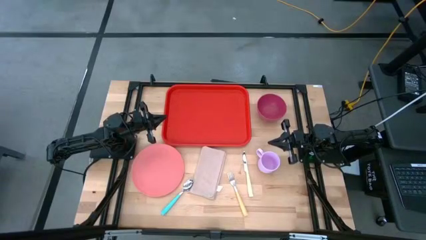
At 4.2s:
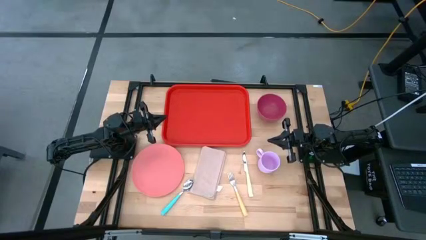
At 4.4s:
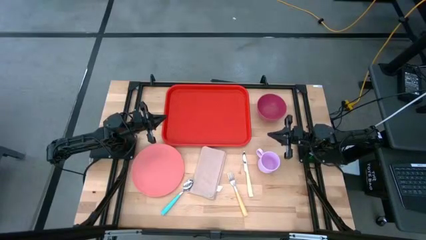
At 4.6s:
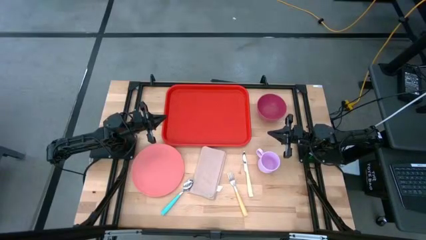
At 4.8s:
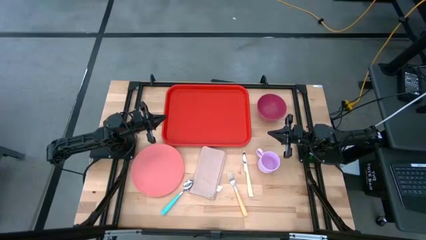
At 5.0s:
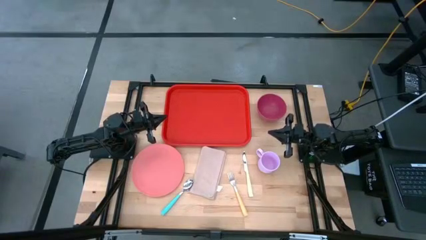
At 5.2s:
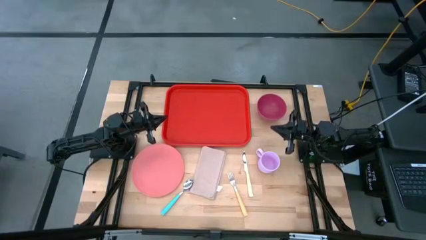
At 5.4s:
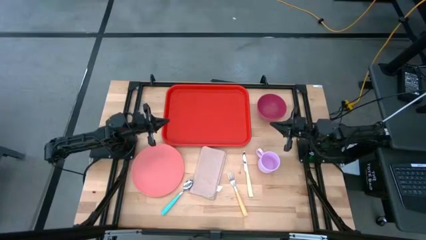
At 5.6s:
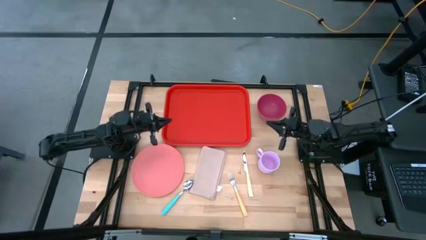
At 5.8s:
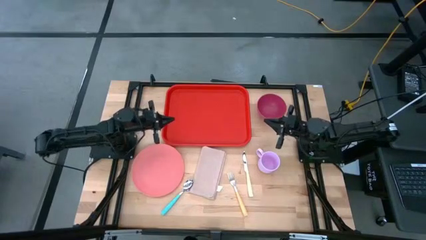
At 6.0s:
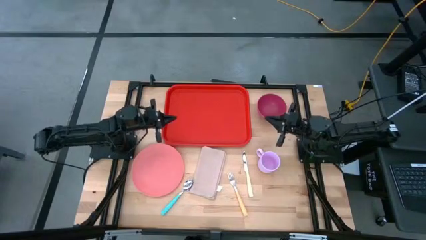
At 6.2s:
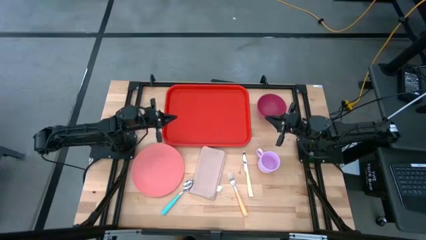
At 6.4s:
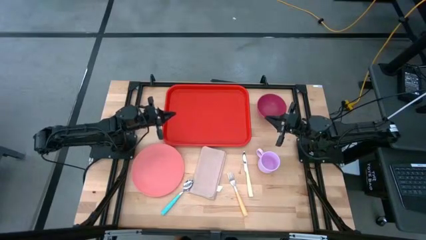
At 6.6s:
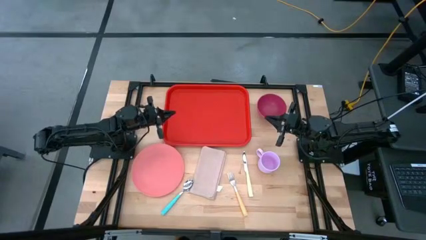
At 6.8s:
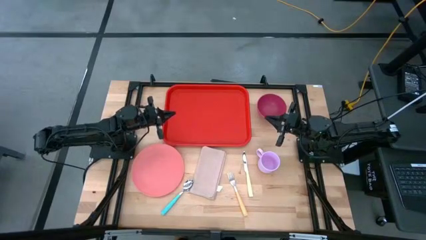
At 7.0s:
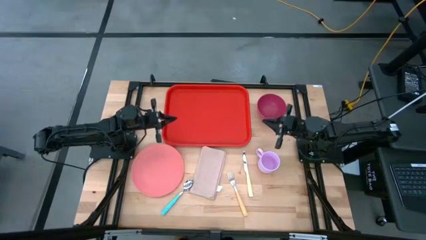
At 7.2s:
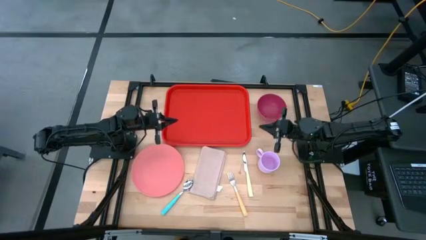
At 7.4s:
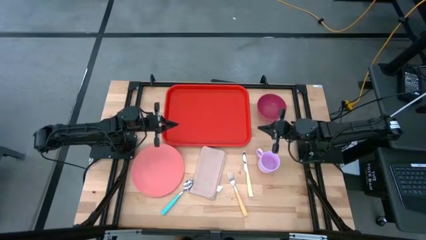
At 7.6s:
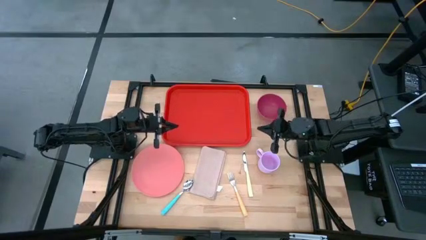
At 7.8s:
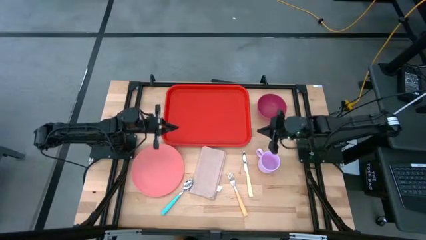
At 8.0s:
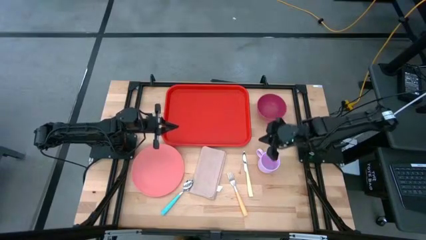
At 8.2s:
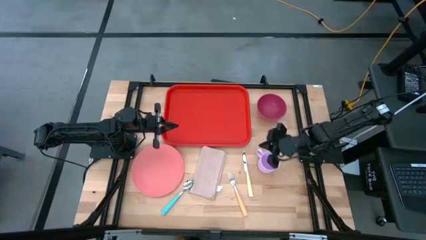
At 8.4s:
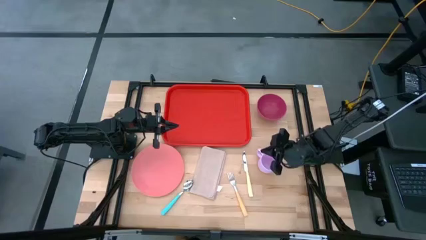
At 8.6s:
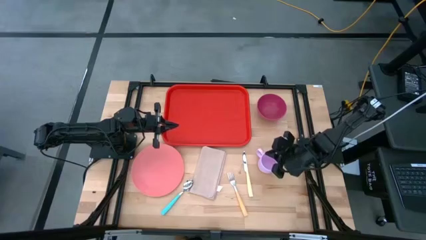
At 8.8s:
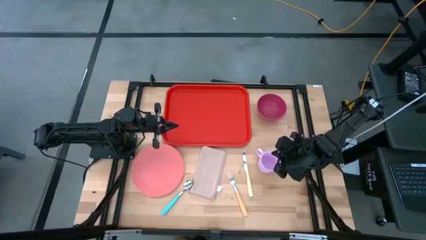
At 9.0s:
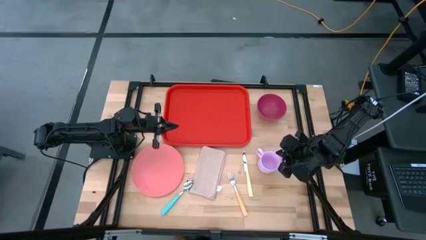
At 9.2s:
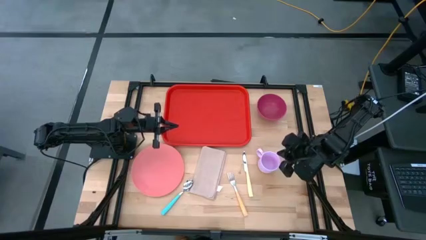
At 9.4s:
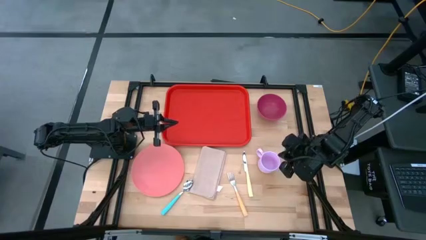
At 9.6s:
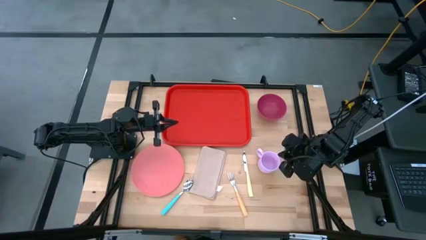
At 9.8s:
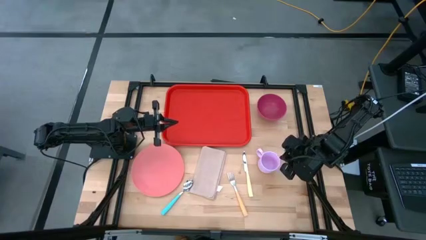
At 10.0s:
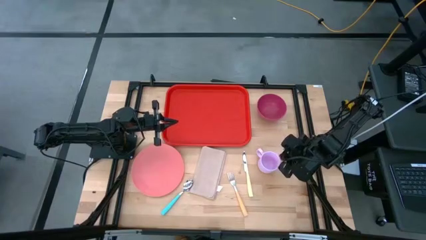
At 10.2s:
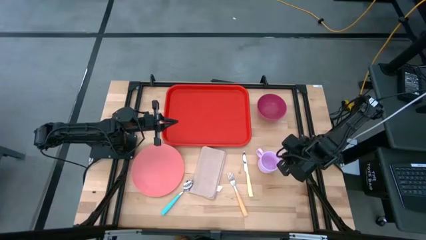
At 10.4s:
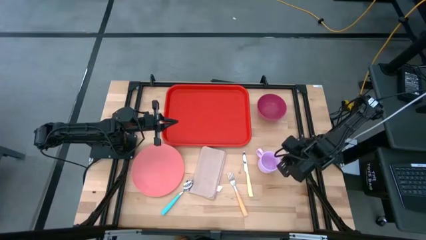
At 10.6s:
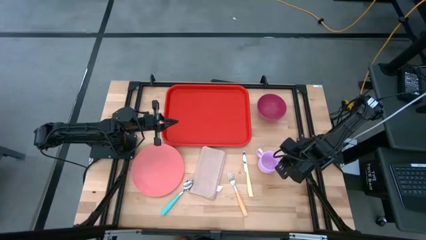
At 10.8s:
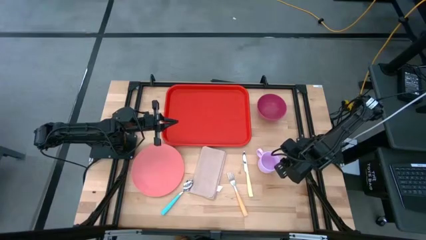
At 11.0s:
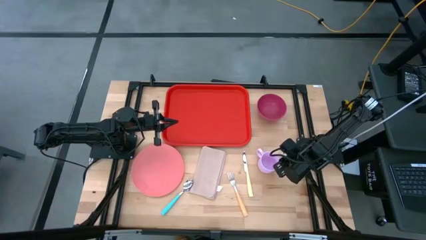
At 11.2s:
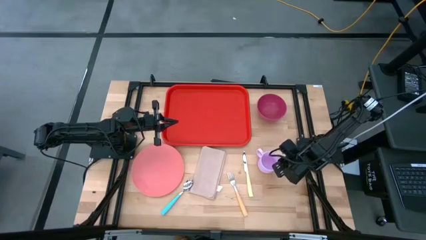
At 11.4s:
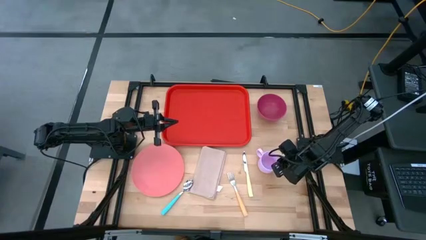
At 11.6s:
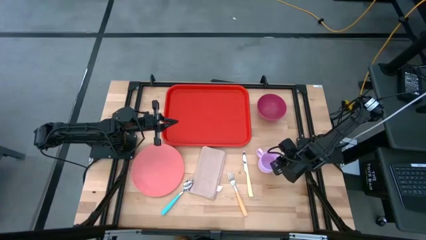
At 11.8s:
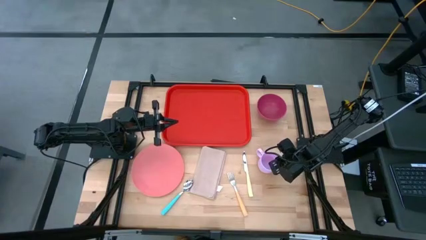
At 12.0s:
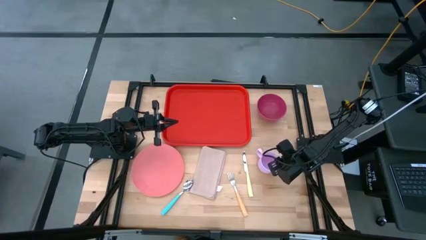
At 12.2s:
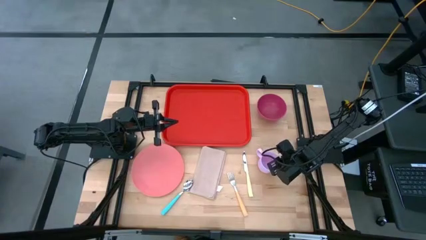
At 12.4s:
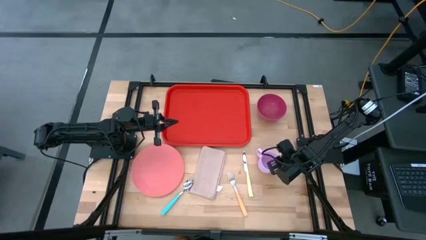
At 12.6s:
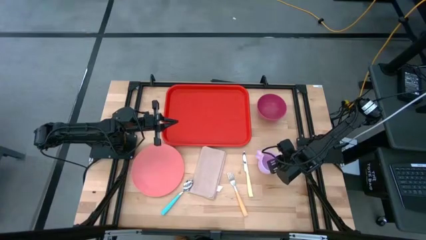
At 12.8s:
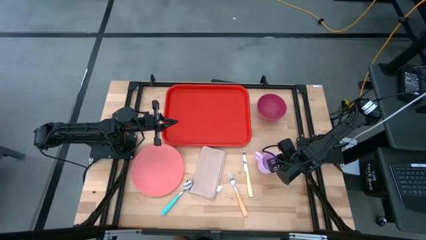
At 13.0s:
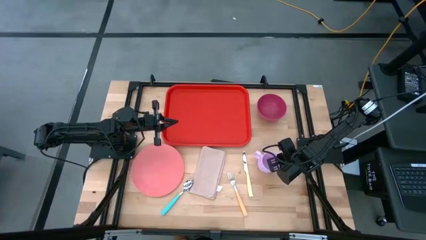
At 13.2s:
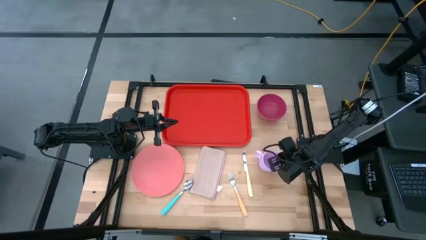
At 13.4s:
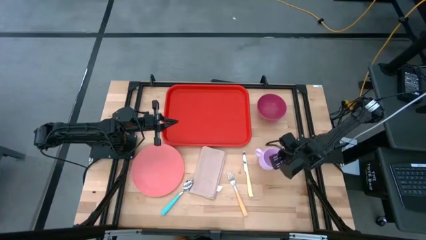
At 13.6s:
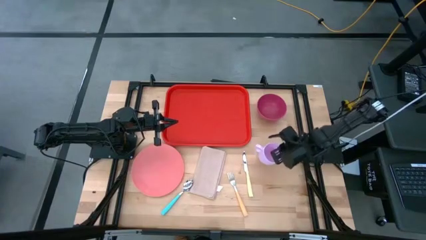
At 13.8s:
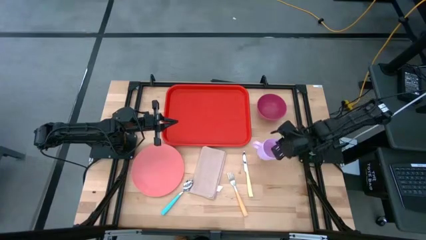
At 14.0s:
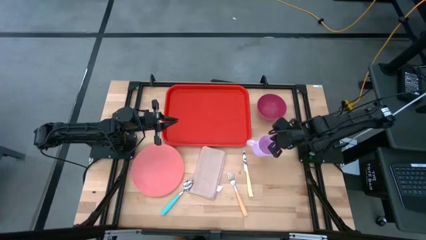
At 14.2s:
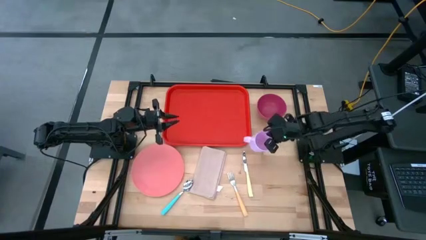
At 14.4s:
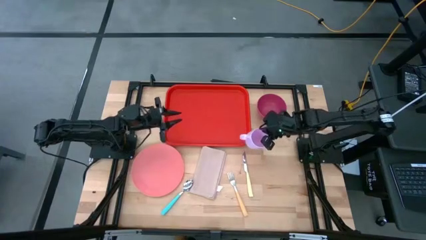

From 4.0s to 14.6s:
Task: Set up tray
Put the purple mug on top of the orange serving tray
